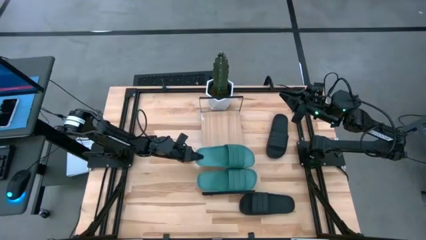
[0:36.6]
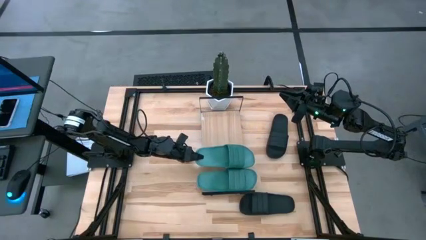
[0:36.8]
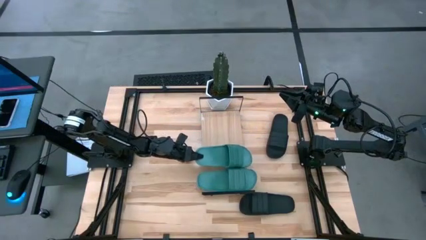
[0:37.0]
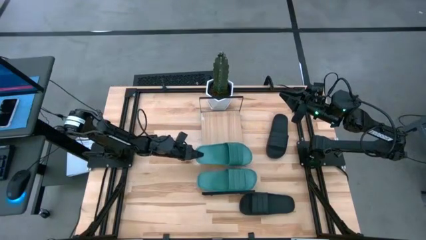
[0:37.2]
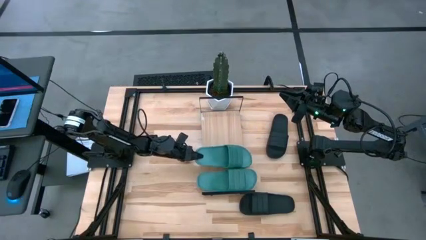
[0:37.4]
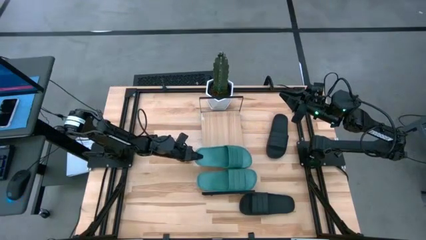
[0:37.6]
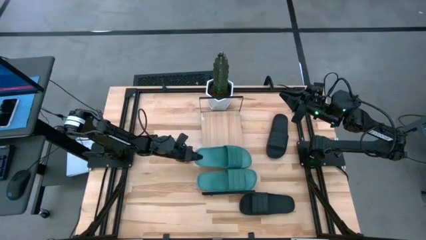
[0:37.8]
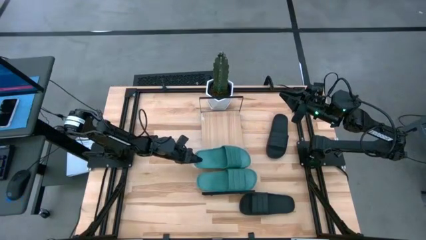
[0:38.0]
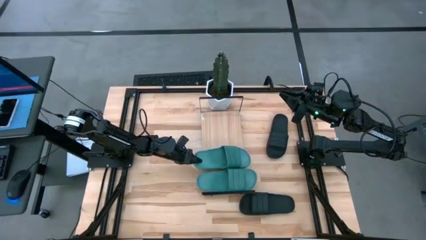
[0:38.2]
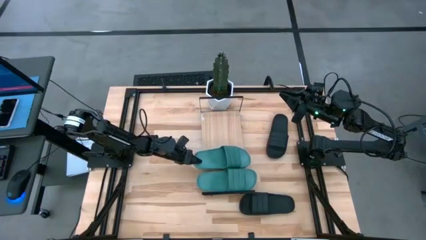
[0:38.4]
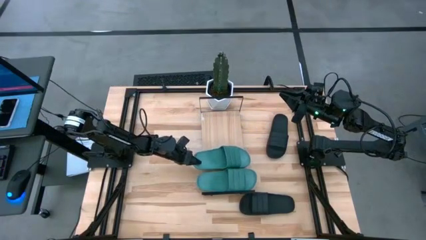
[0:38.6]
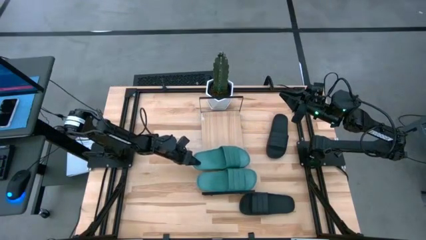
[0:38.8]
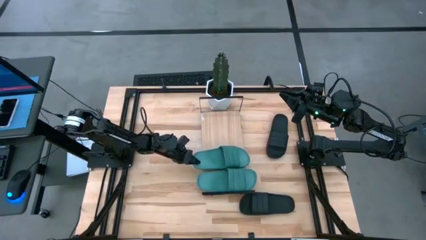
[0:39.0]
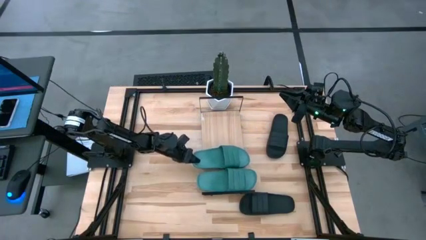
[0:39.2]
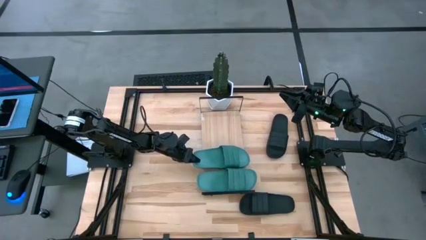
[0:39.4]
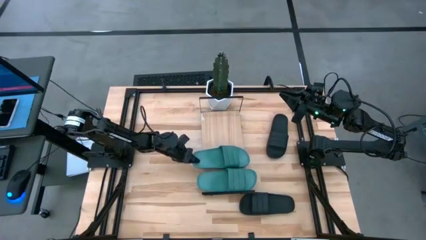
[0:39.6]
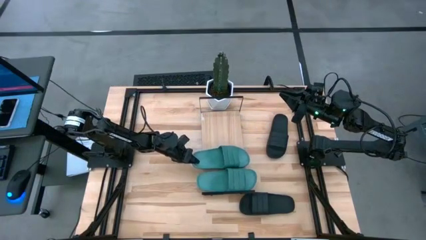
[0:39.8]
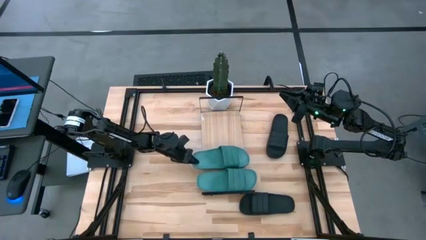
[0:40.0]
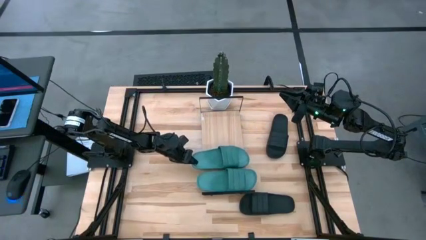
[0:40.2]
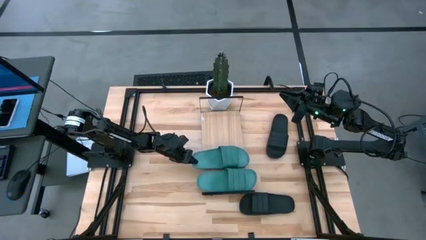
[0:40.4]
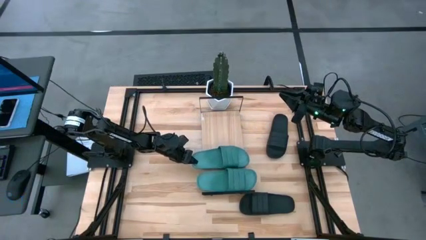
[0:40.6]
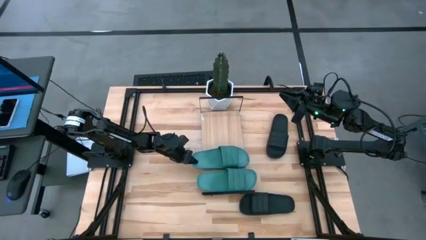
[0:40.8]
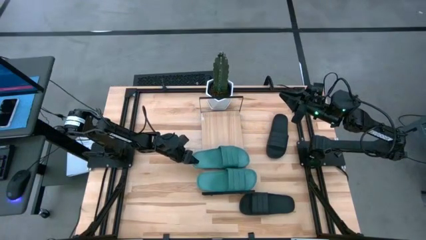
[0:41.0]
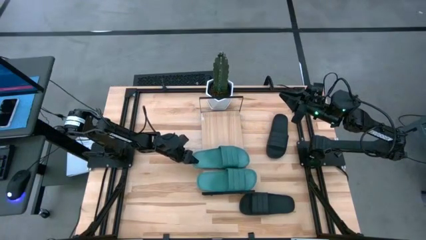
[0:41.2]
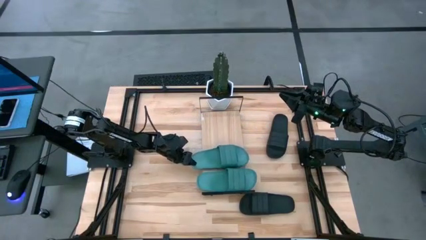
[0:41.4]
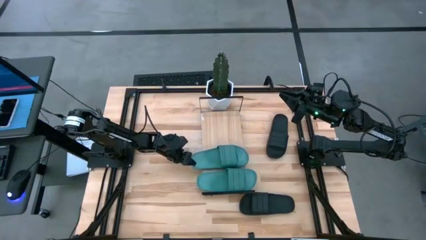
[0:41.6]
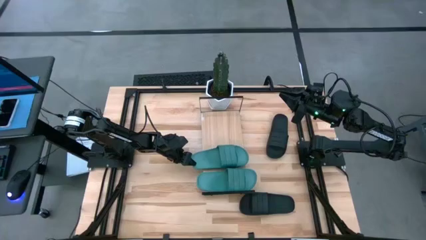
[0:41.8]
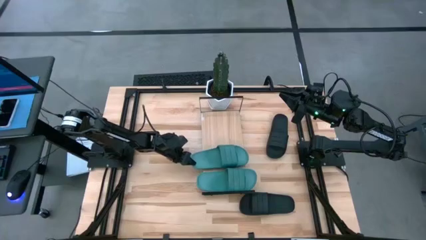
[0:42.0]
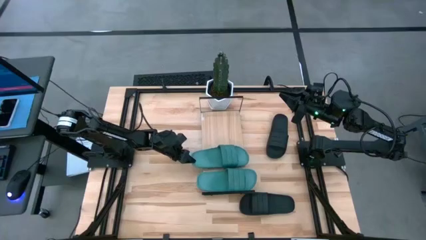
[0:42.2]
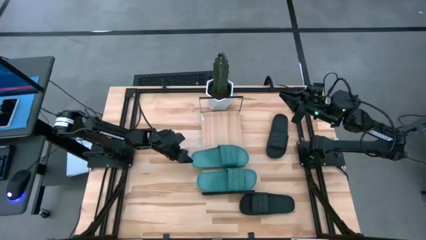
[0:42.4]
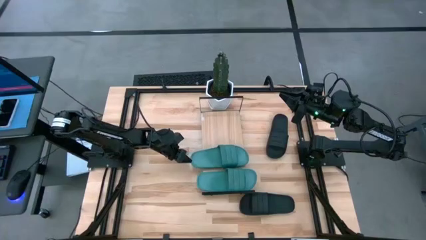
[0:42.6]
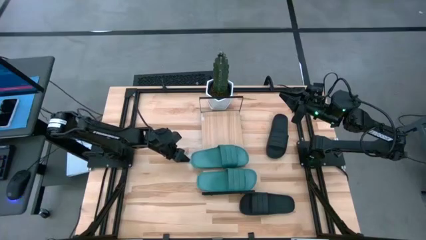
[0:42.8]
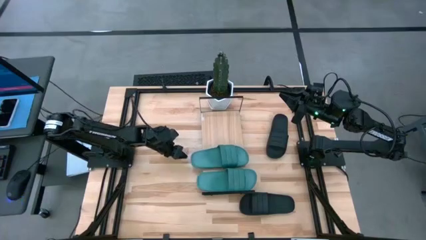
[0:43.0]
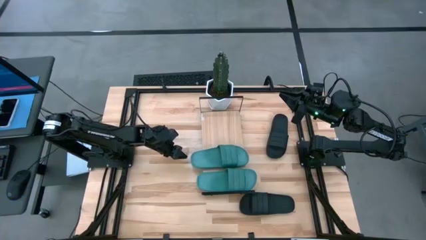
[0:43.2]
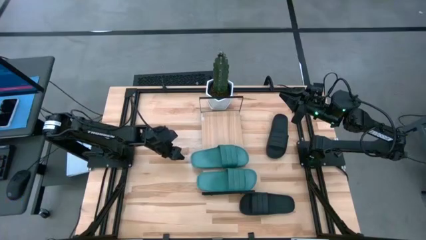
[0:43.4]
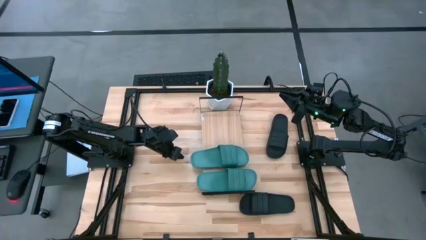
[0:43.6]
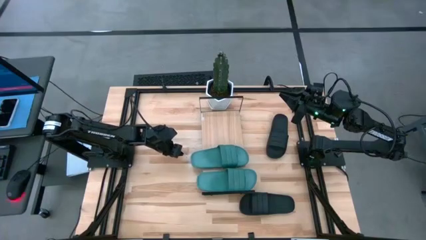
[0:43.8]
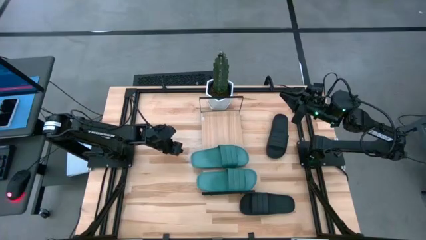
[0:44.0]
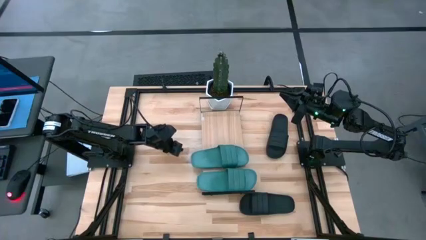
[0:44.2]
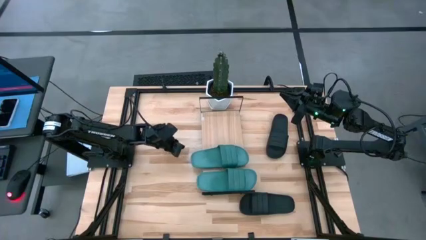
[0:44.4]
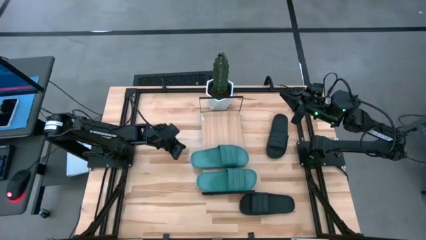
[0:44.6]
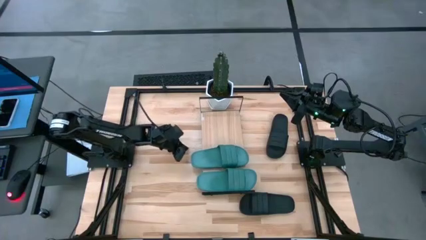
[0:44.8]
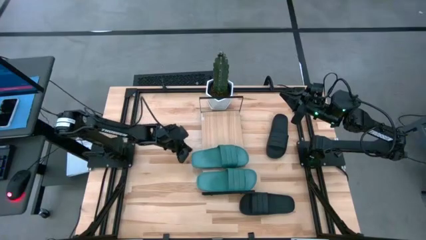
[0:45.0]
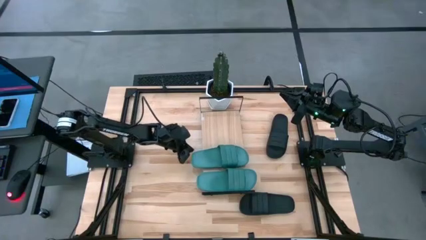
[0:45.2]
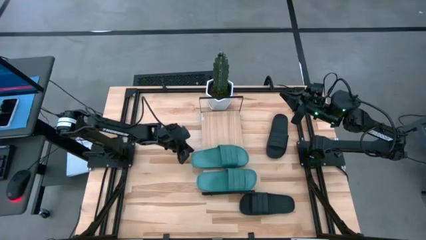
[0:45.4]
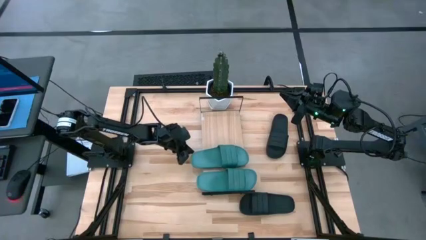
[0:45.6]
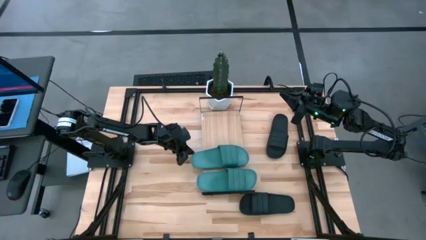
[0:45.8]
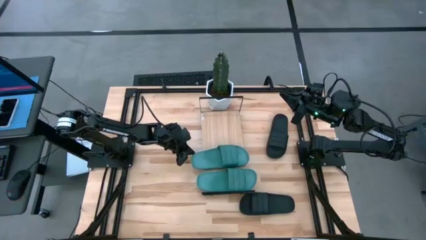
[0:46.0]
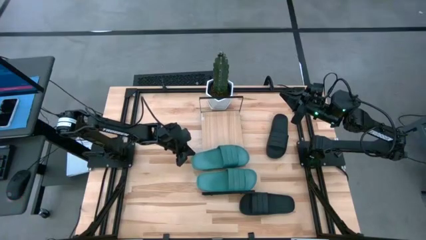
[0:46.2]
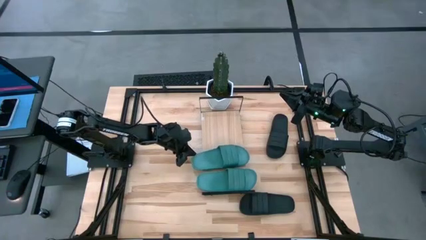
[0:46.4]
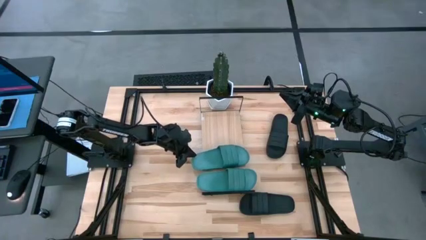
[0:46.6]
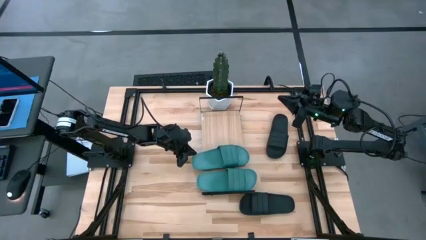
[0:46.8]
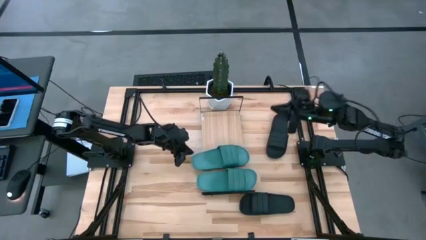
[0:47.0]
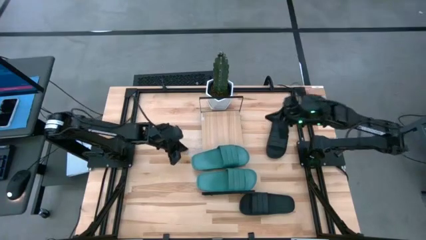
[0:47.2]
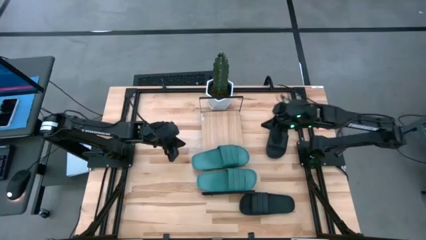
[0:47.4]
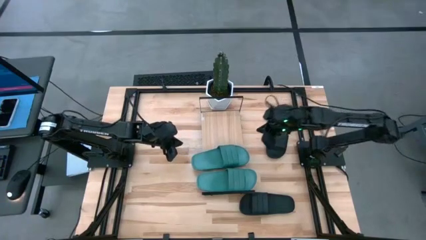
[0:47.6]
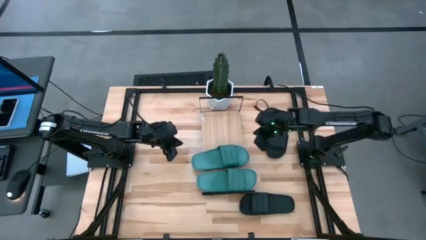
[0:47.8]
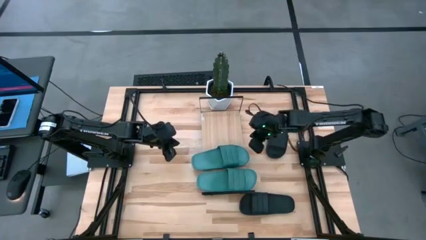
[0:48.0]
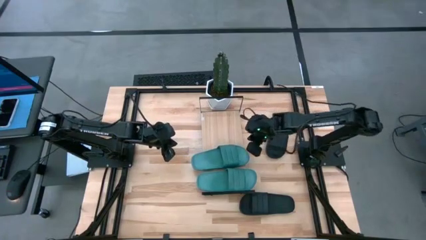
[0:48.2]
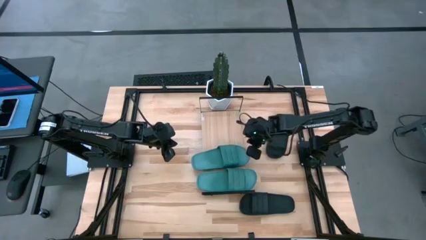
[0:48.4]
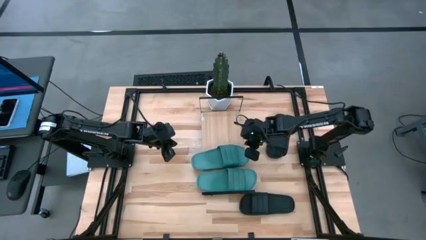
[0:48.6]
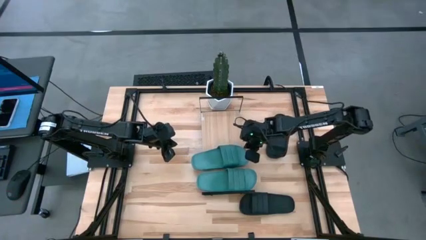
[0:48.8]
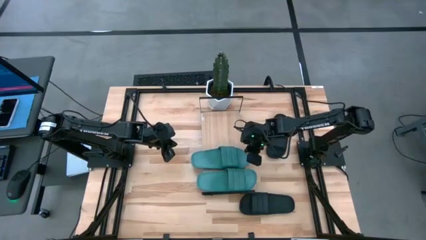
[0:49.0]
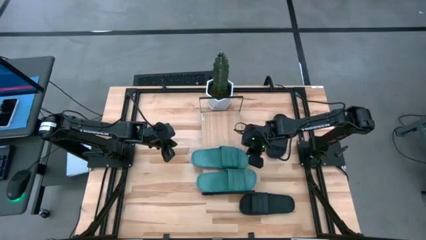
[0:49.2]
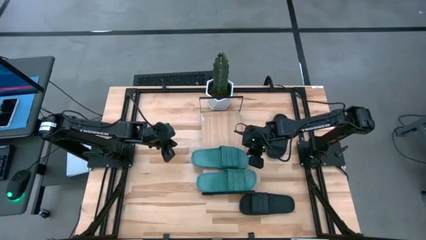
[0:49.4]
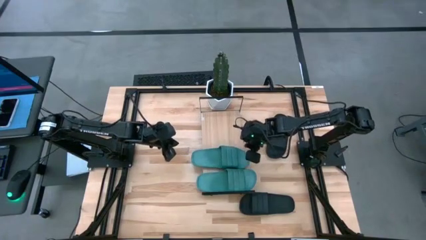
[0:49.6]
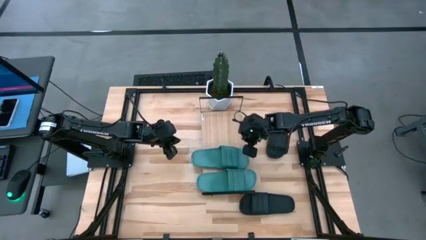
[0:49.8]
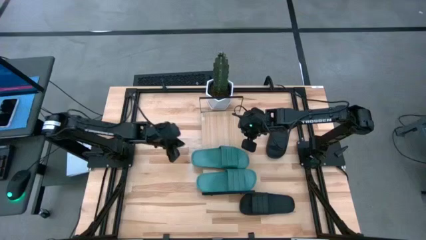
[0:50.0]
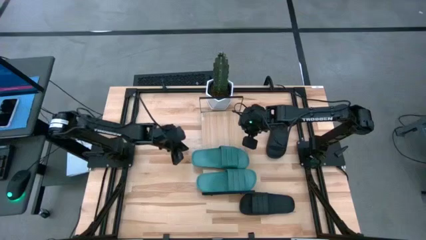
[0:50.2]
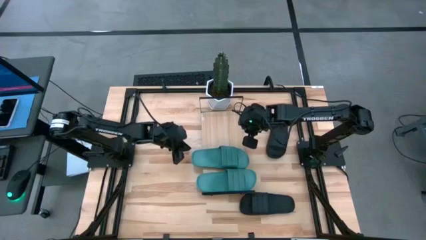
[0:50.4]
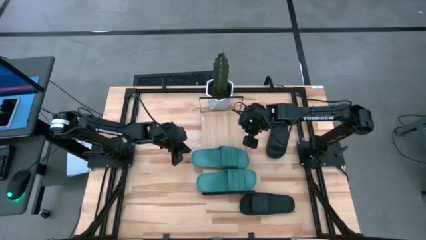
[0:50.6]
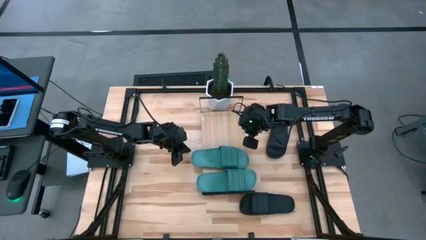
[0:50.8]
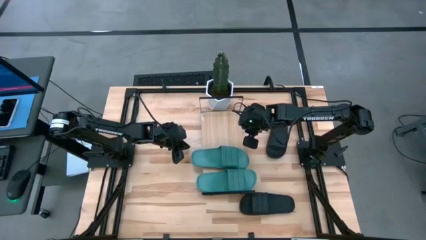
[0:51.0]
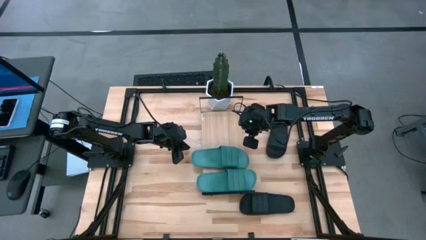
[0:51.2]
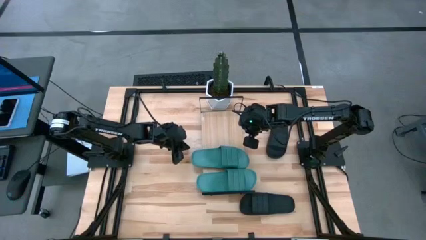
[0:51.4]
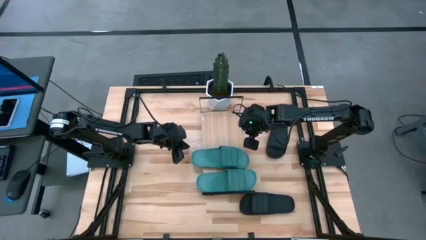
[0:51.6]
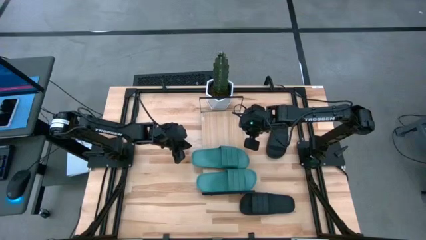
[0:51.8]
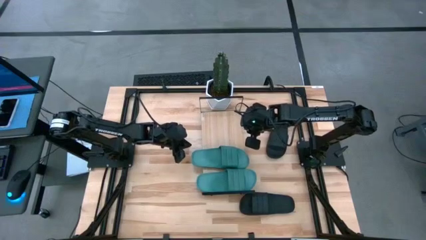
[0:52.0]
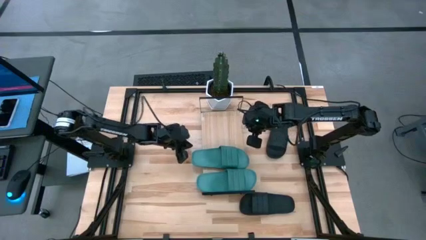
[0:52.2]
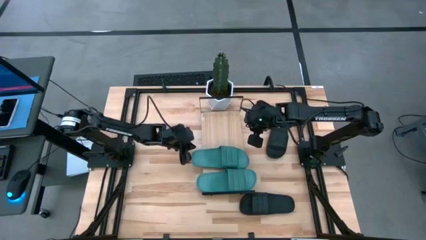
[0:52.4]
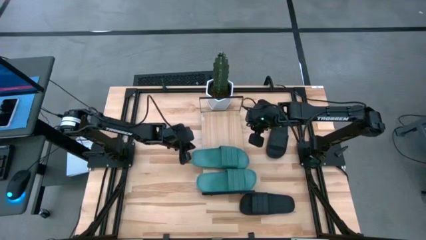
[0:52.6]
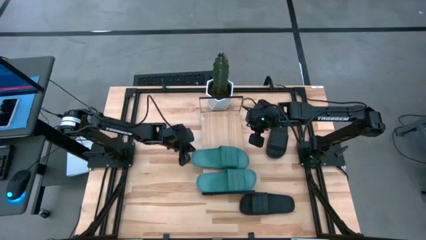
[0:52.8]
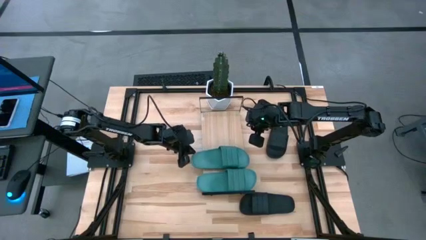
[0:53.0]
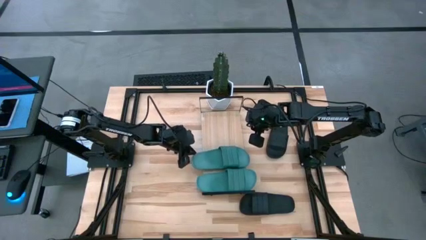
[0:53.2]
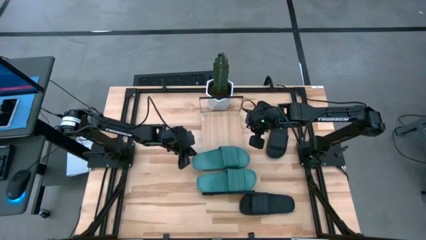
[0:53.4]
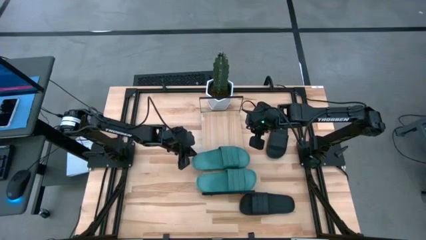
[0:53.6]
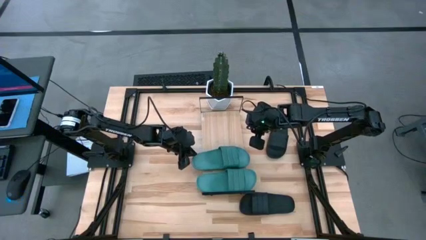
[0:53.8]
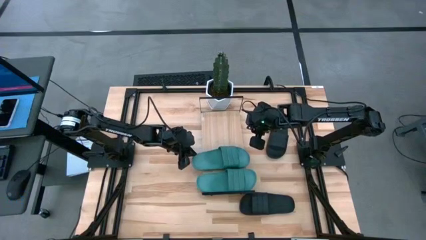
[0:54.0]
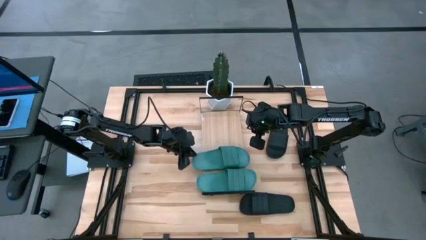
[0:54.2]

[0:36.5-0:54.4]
Task: Pick and place slides into the shelf
Put the green slipper on the shelf
